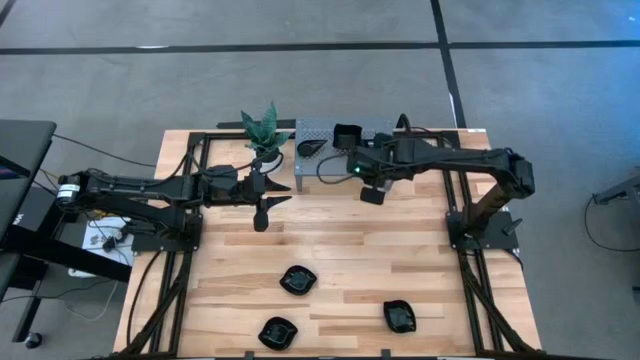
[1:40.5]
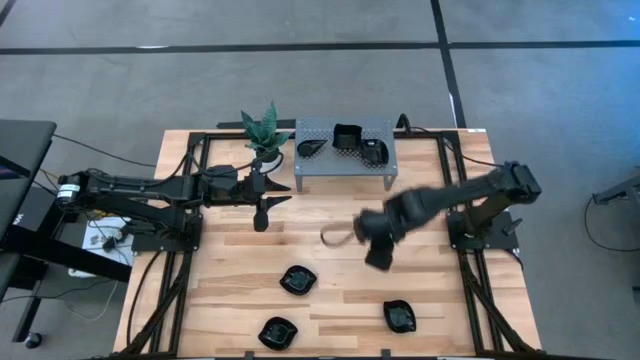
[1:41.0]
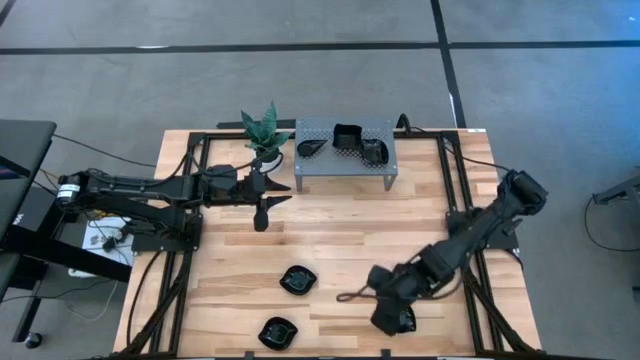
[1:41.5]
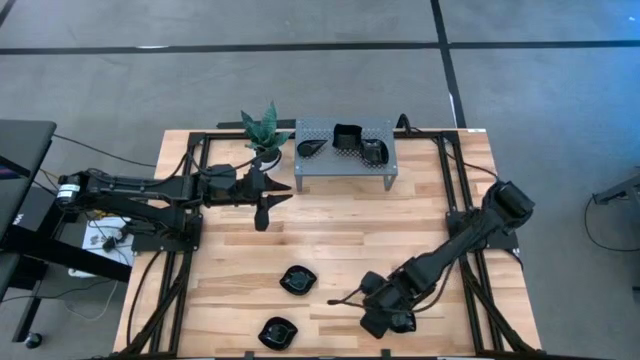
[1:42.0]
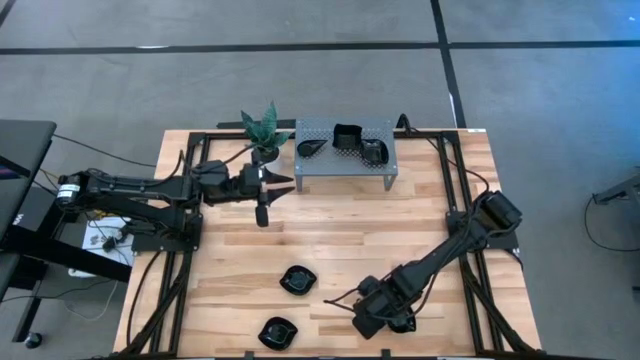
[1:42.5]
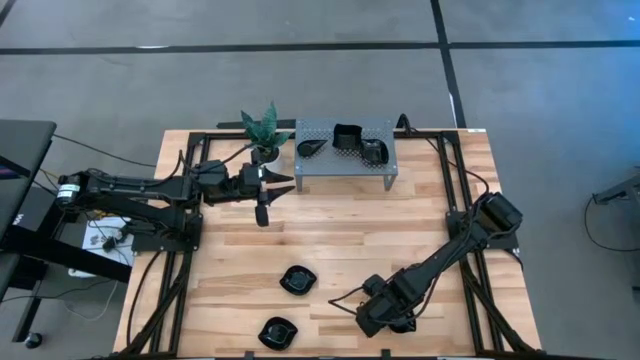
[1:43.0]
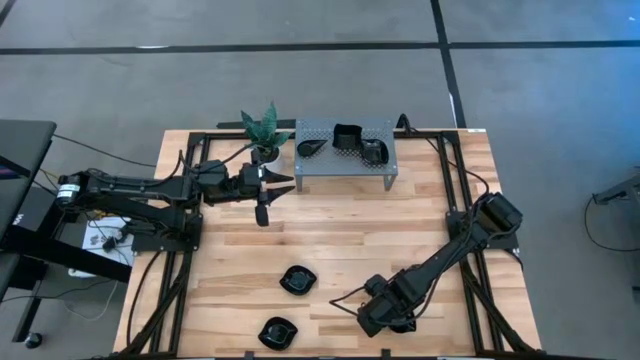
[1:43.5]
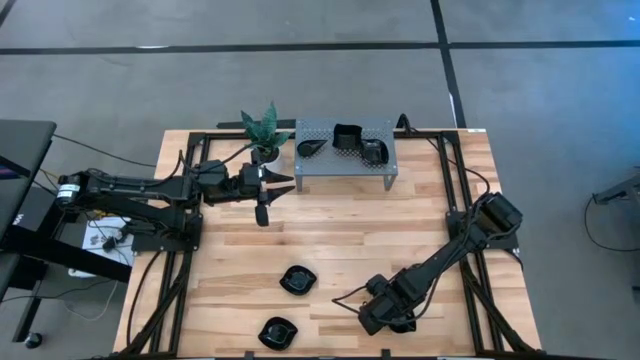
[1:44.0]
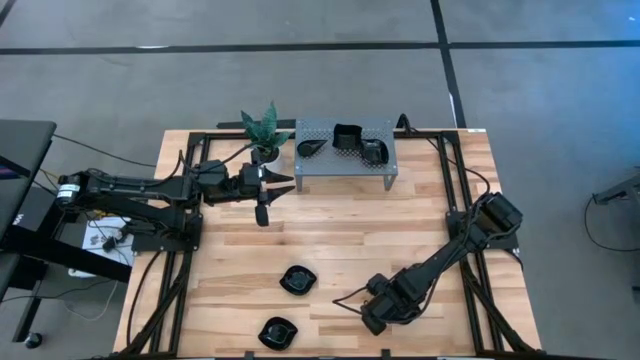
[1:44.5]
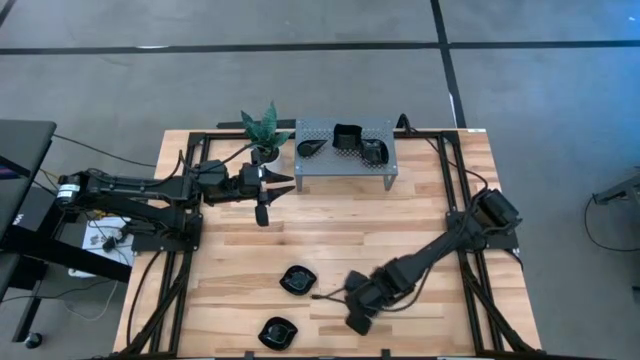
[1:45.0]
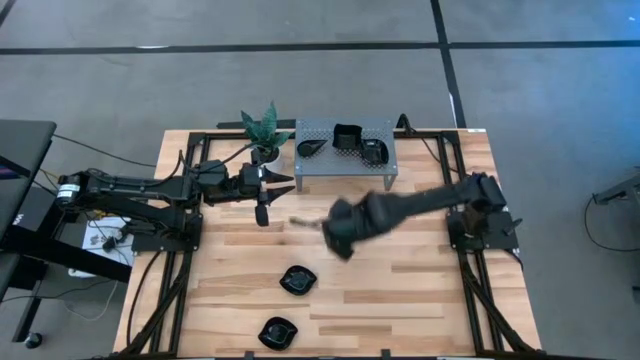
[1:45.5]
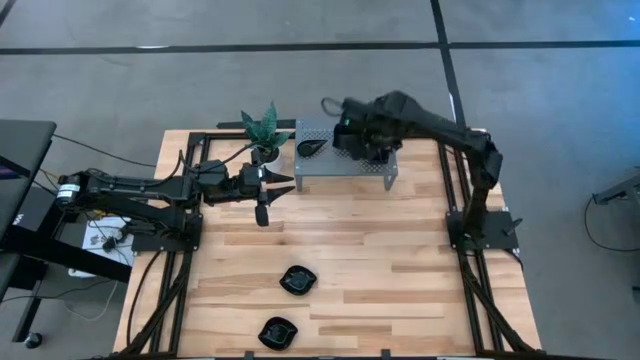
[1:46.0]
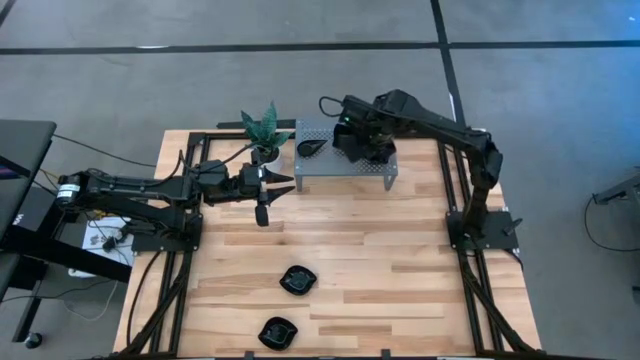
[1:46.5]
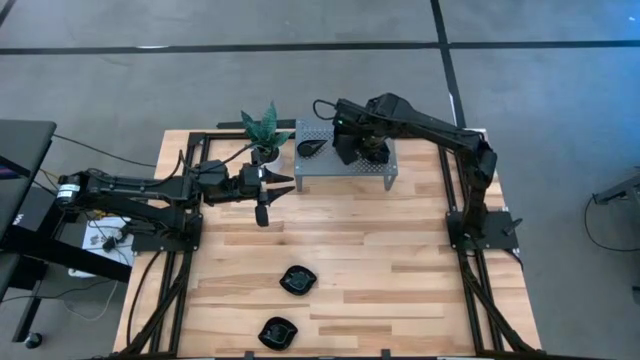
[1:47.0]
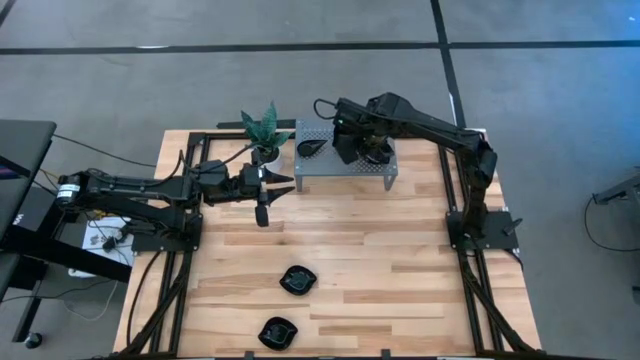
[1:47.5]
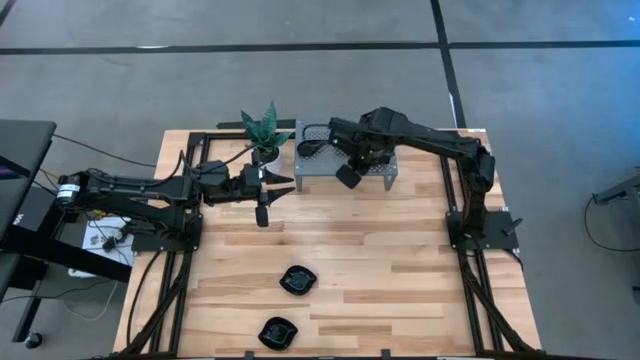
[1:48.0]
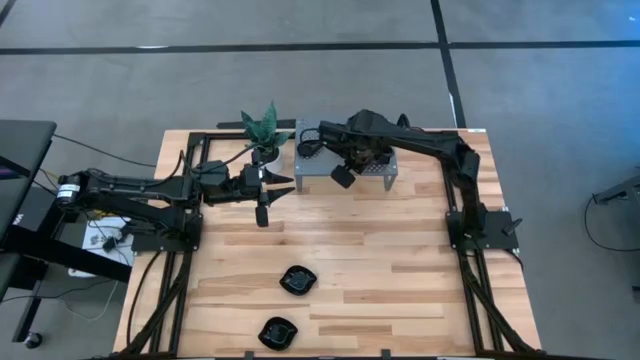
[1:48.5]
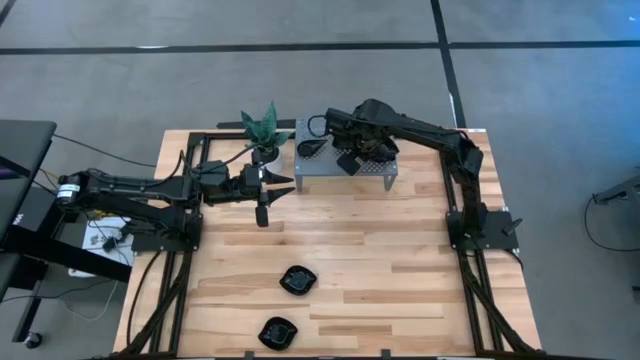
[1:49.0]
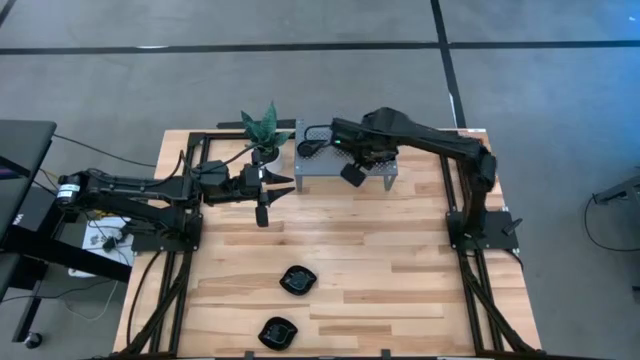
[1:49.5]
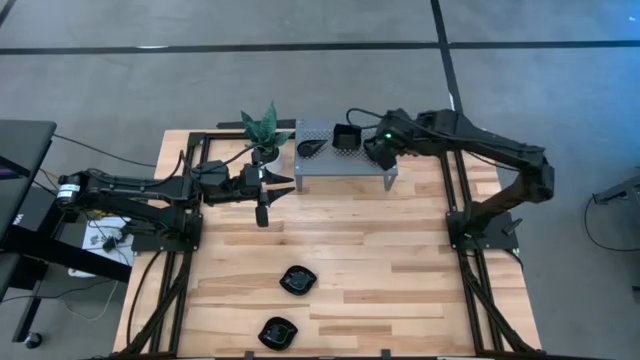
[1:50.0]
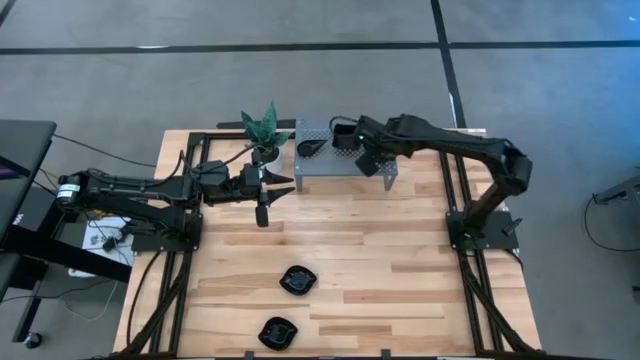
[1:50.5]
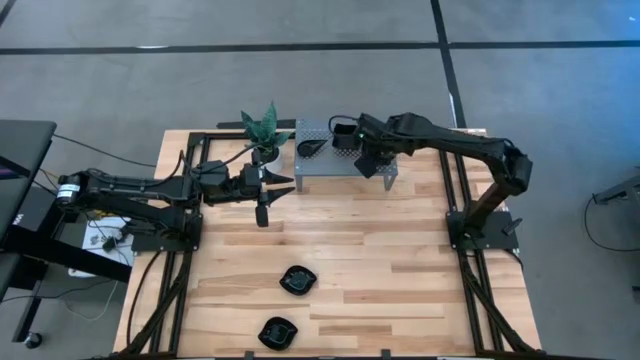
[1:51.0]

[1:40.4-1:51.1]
Task: Pick & Place Mini shaped plates
Stack the right leaf-shaped plate on top of the leaf-shaped plate on the shelf

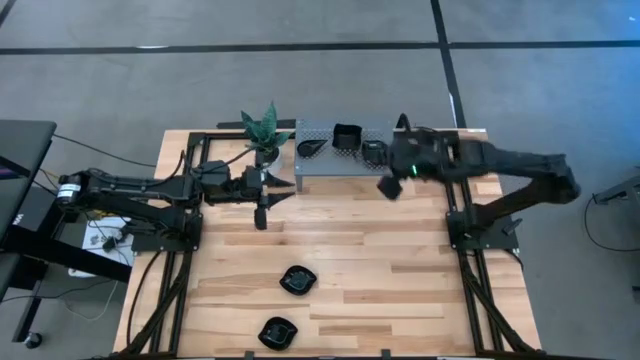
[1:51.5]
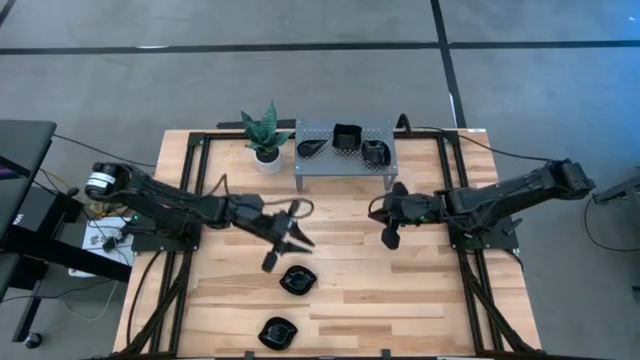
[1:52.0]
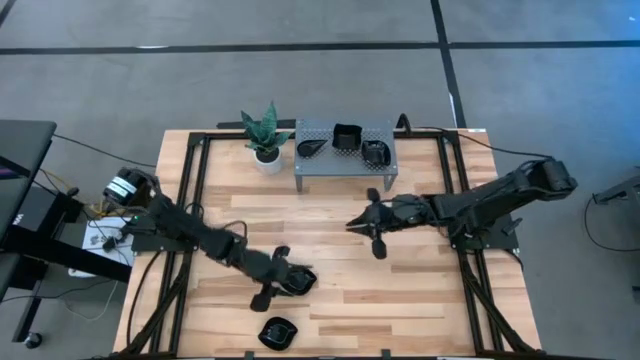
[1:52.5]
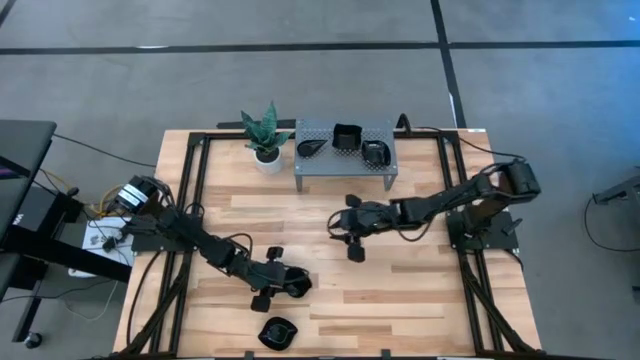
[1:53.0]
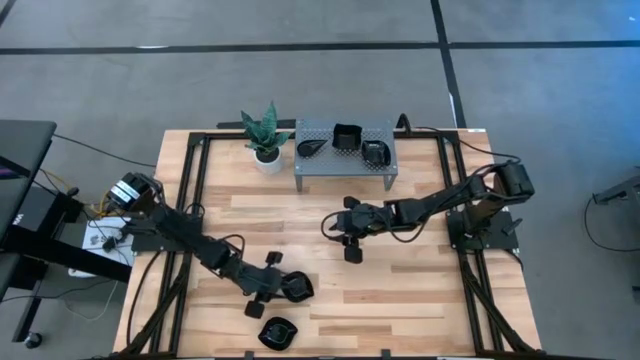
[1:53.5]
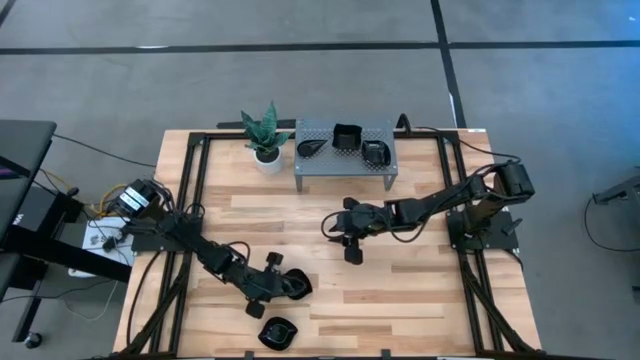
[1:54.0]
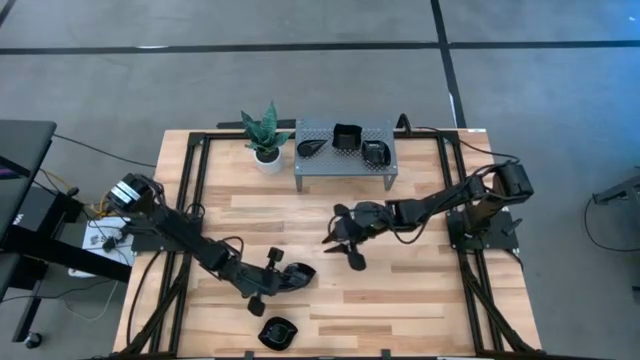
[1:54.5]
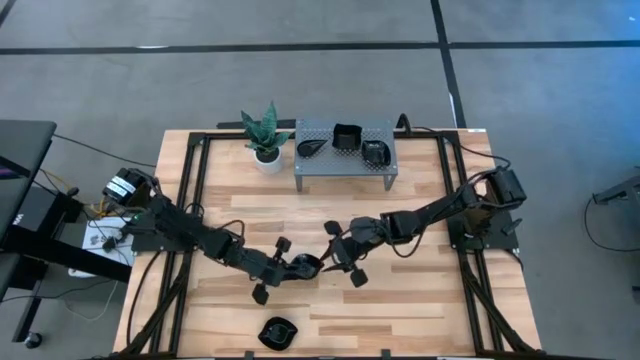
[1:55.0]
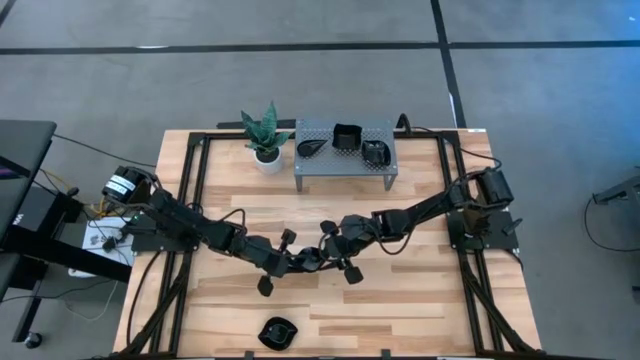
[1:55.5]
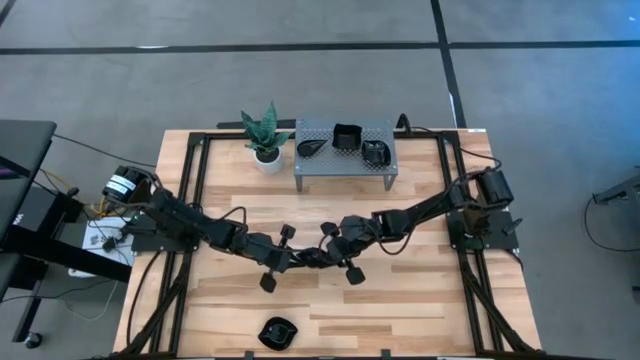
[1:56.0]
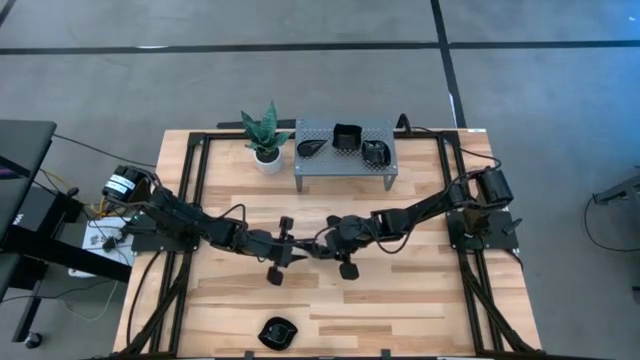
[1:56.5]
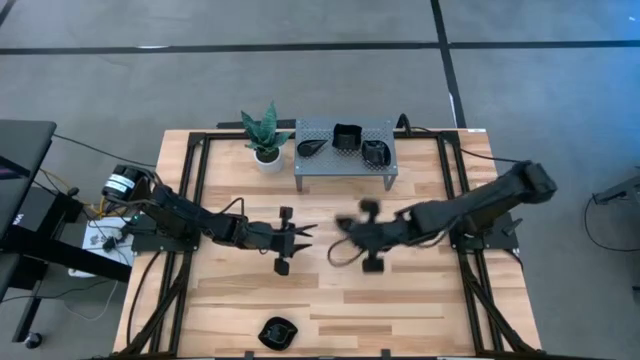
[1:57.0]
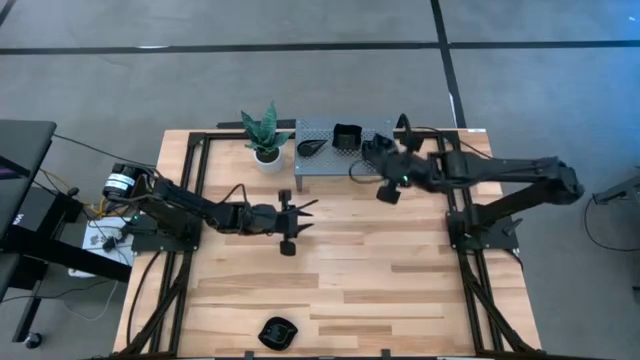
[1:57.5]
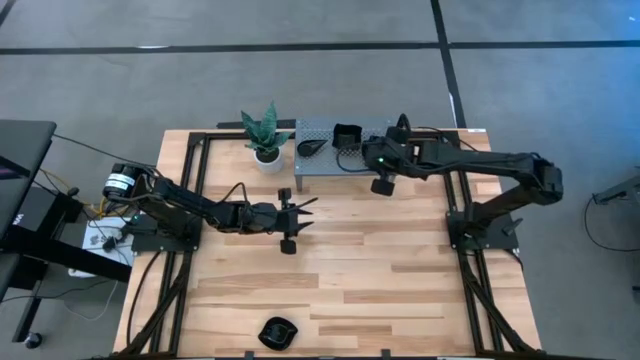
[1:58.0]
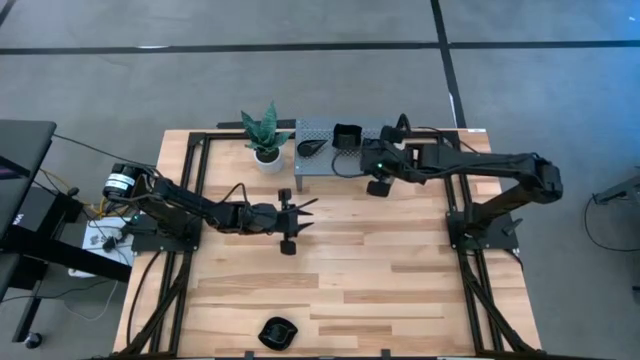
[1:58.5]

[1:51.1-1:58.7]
Stack the top leaf-shaped plate on top of the leaf-shaped plate on the shelf
